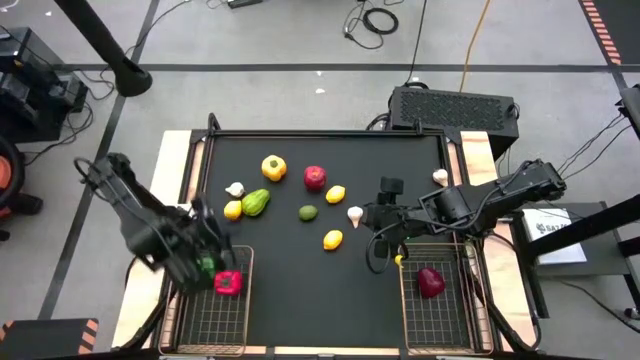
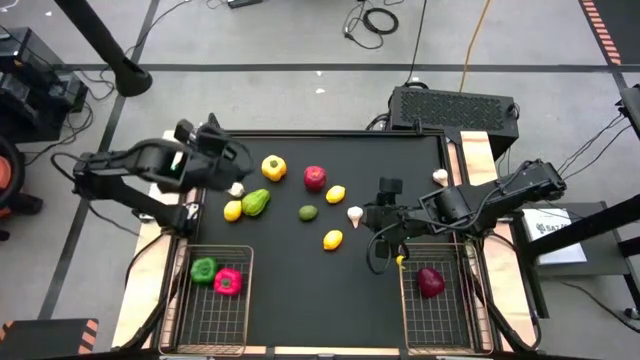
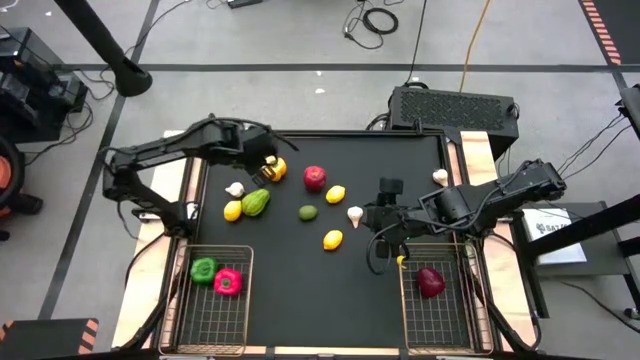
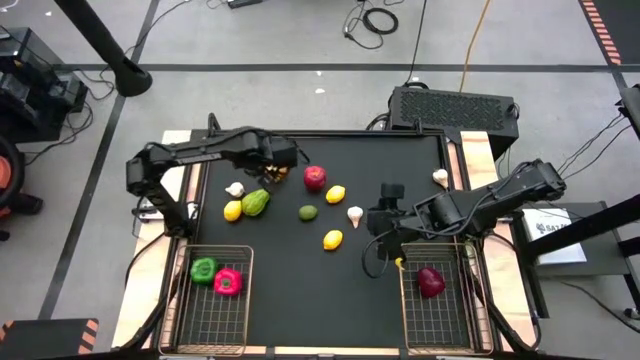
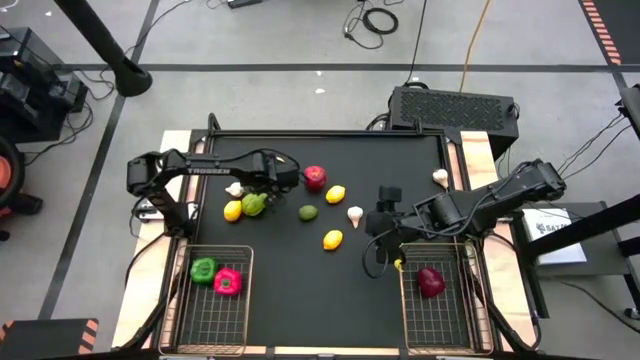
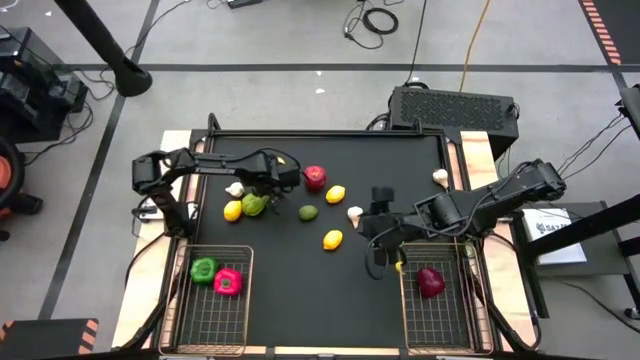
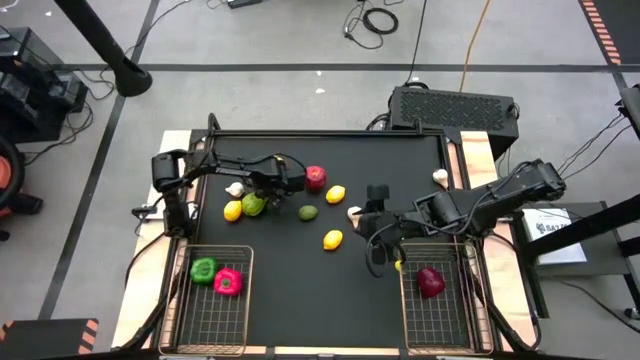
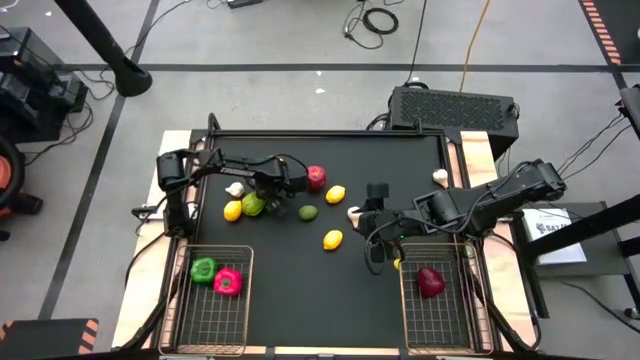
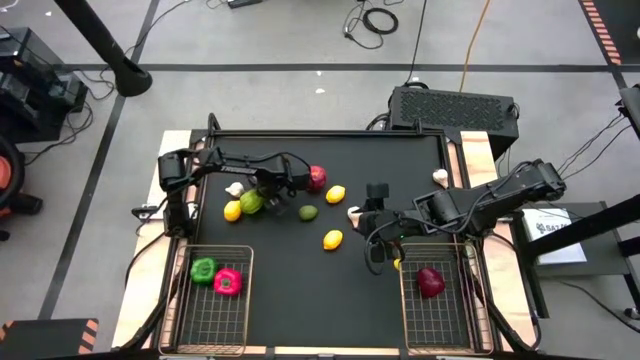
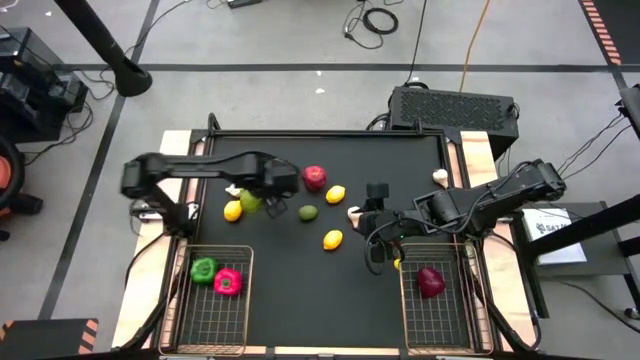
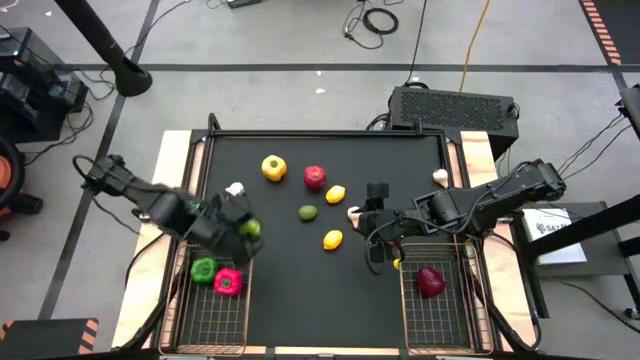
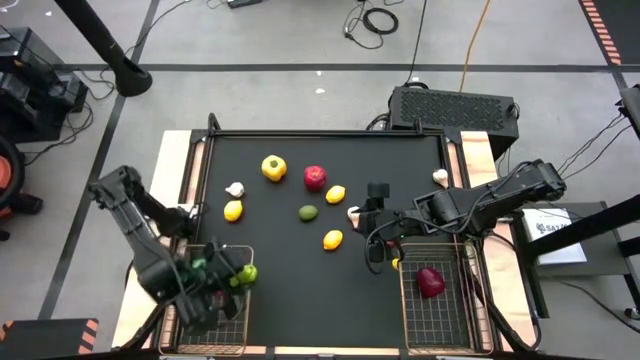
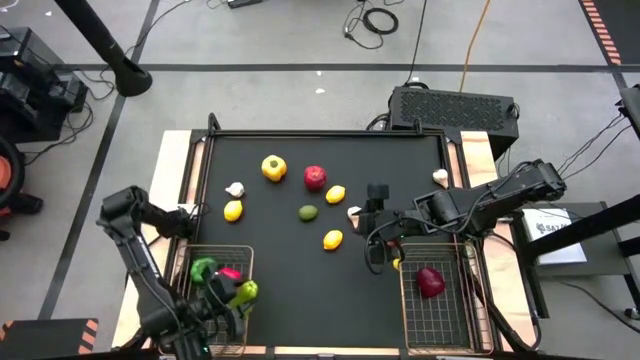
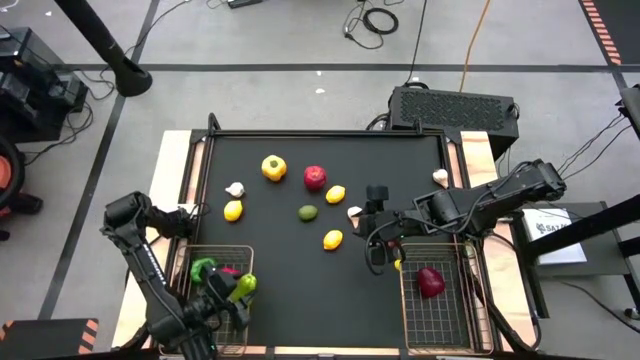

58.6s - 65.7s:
Task: Sort produce into baskets
Put the chayote into the left gold wire basket

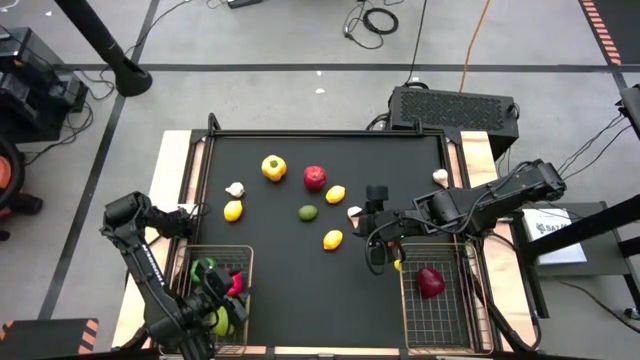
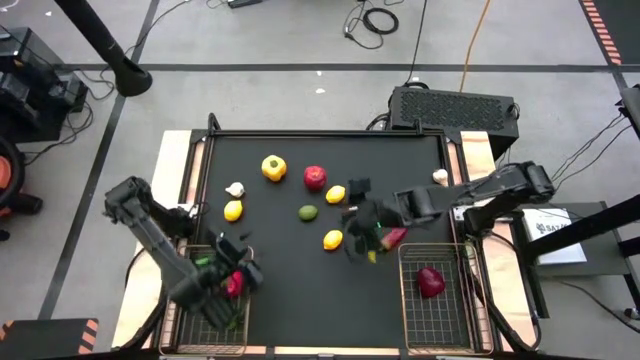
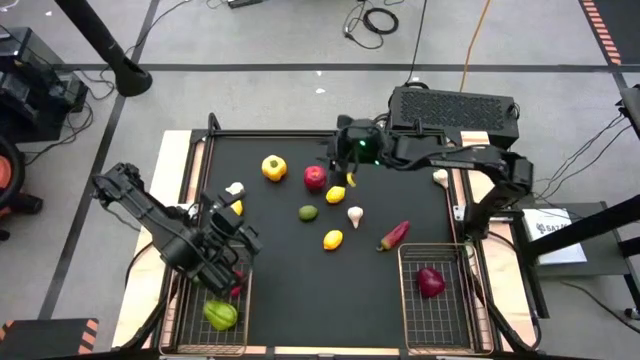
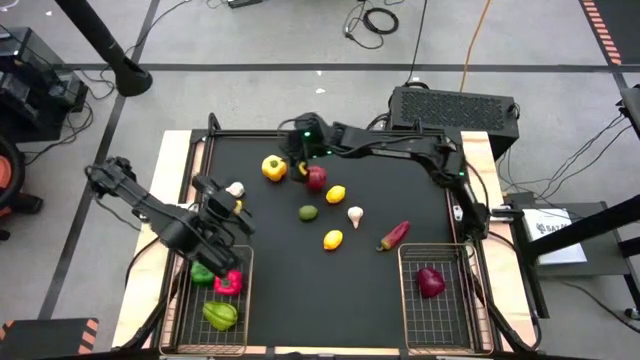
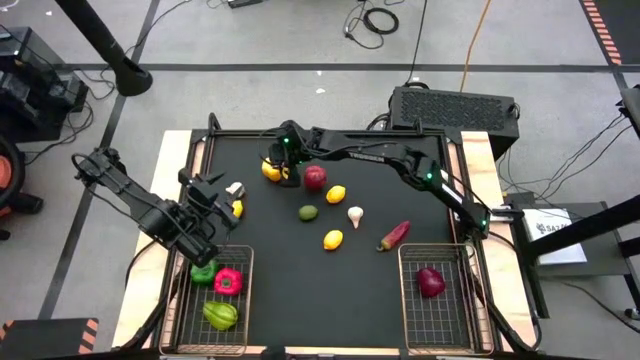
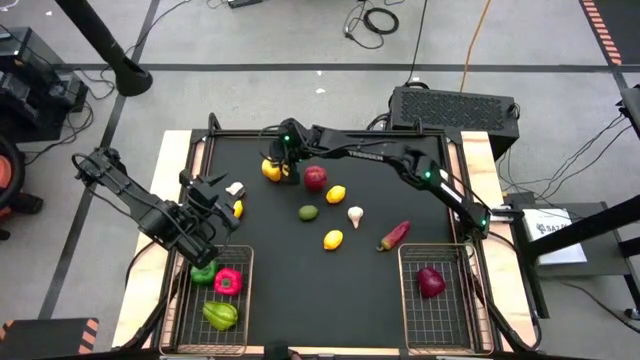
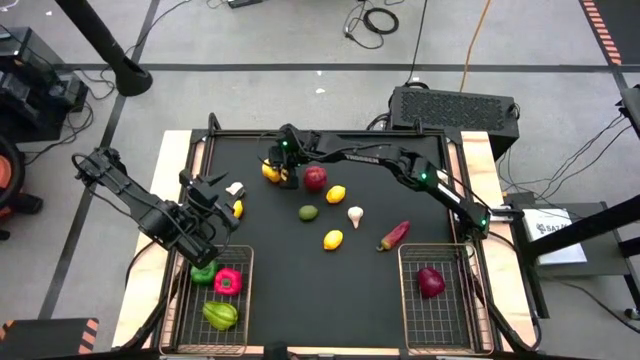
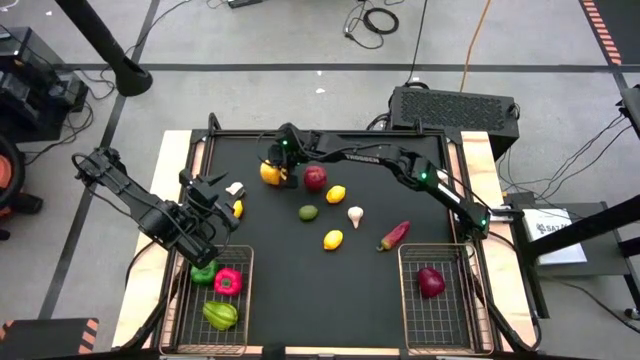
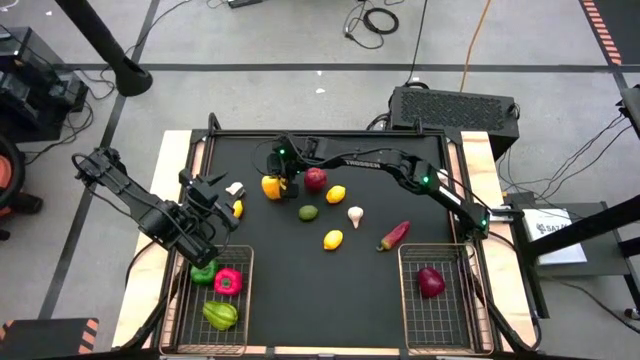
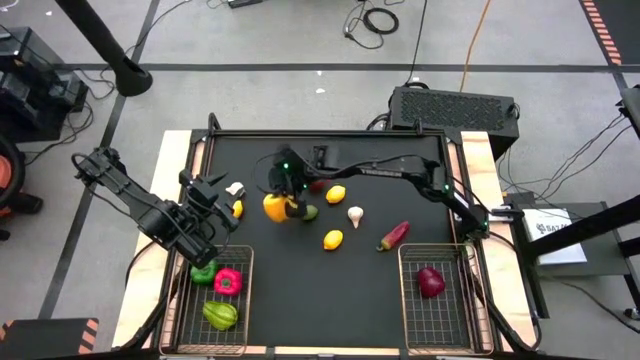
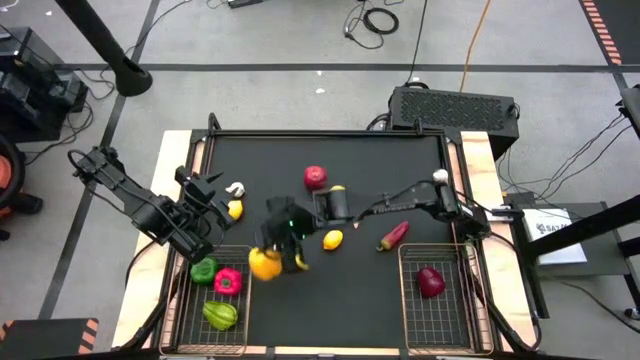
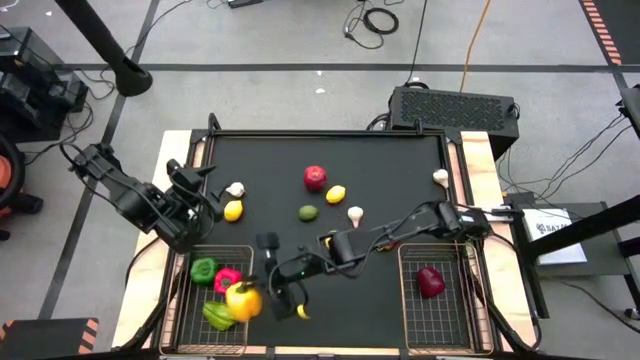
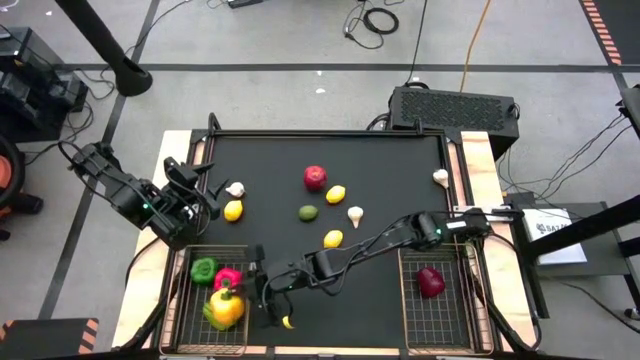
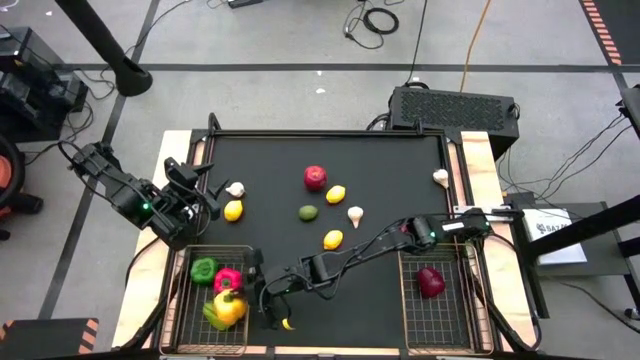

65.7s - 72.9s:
Put the yellow bell pepper into the left gold wire basket

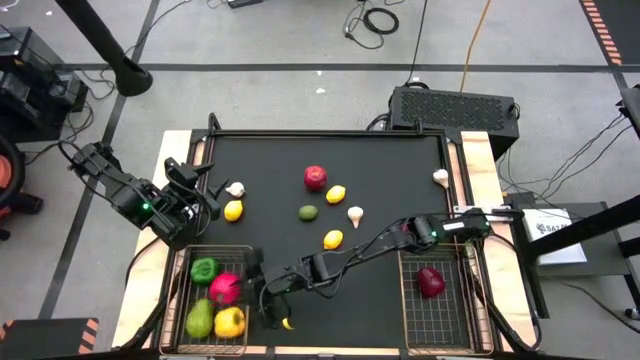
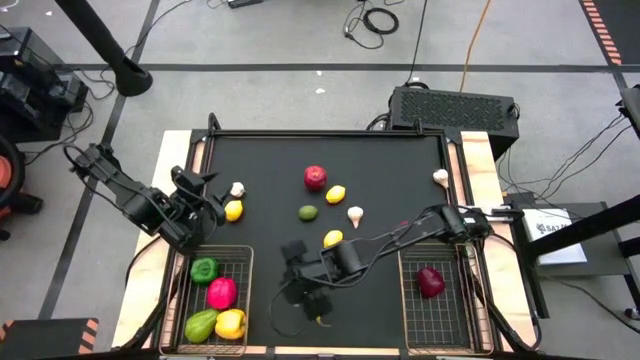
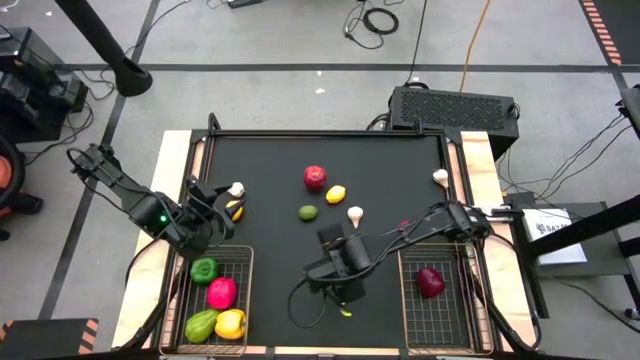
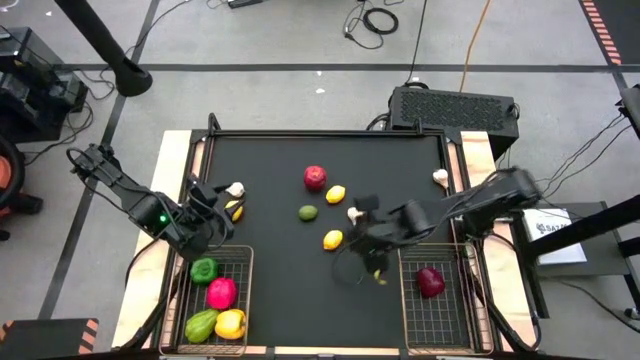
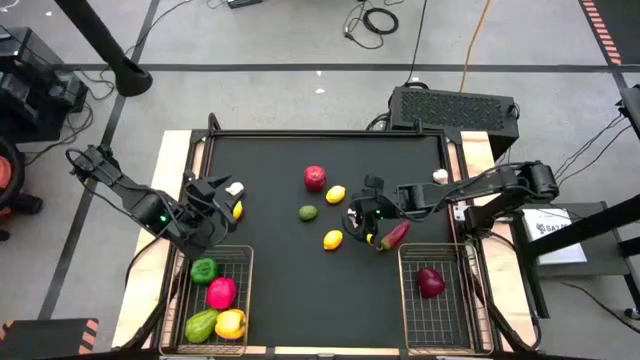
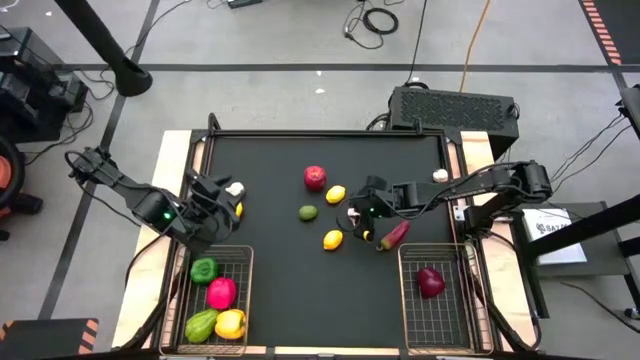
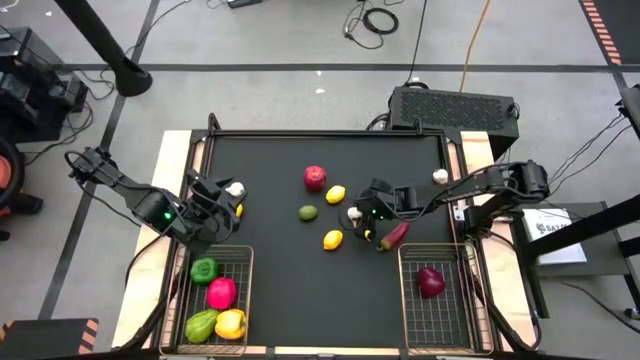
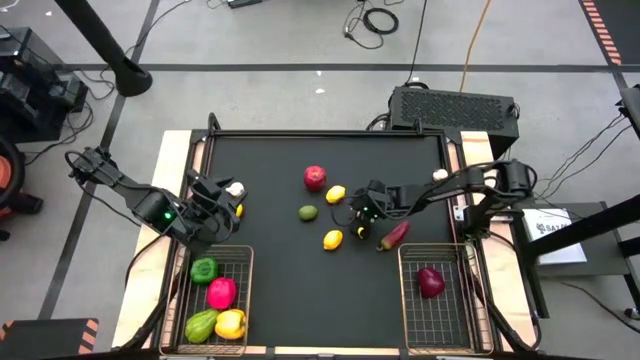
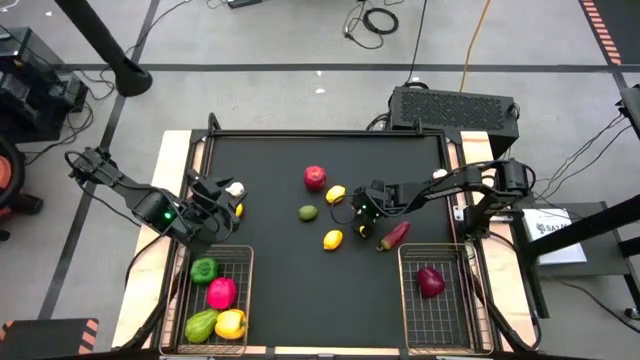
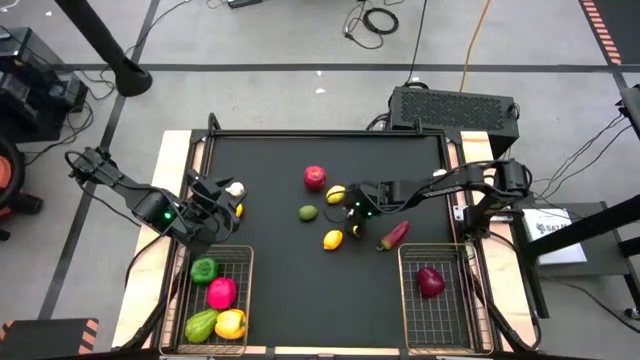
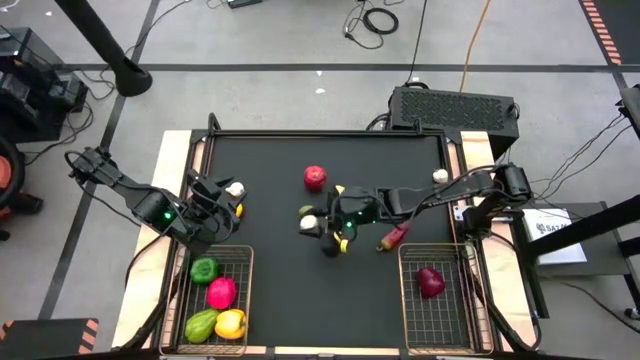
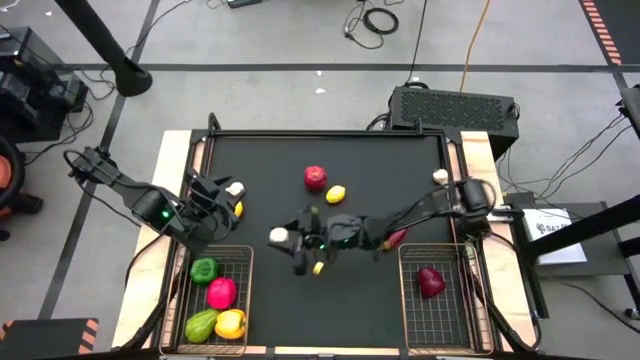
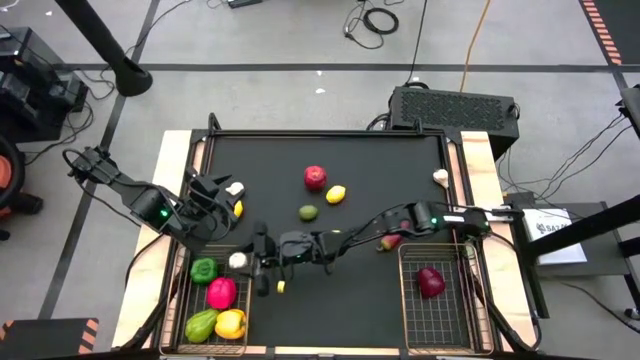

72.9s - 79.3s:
Put the middle garlic into the left gold wire basket

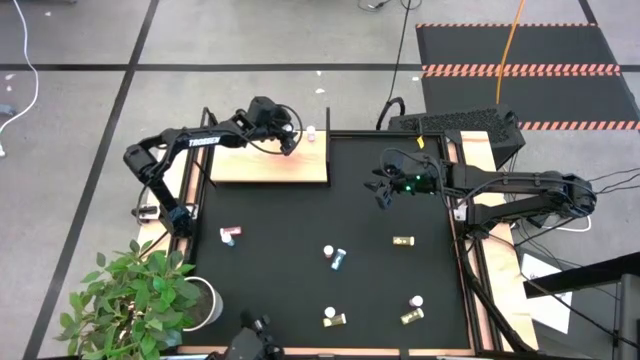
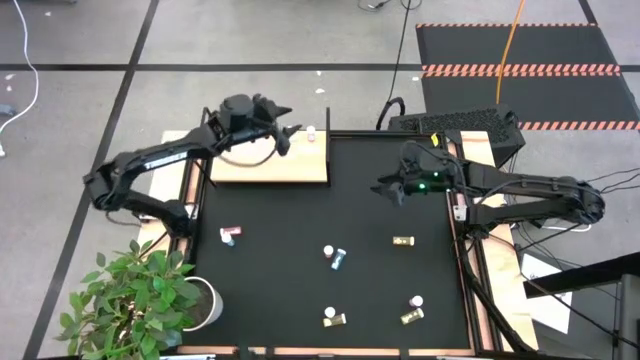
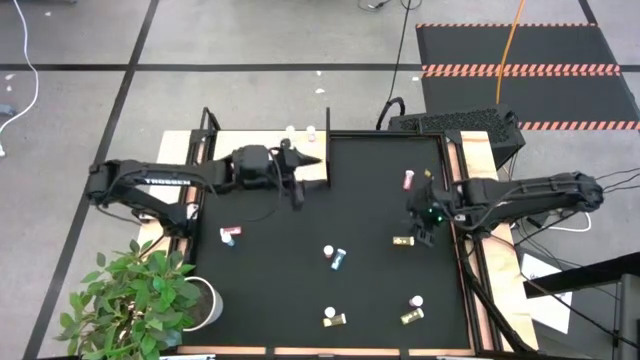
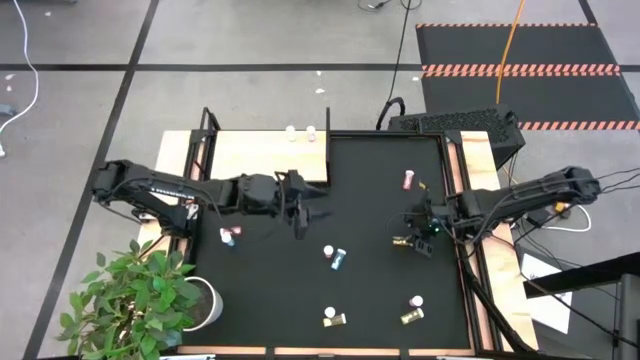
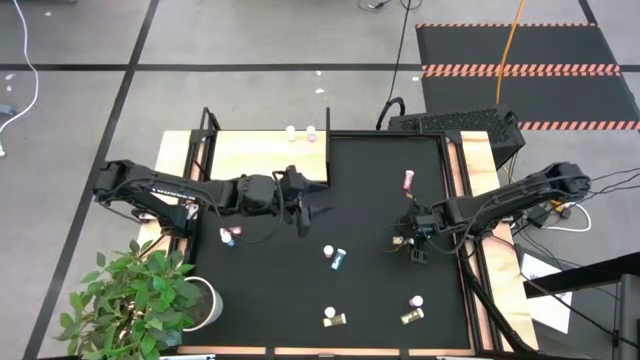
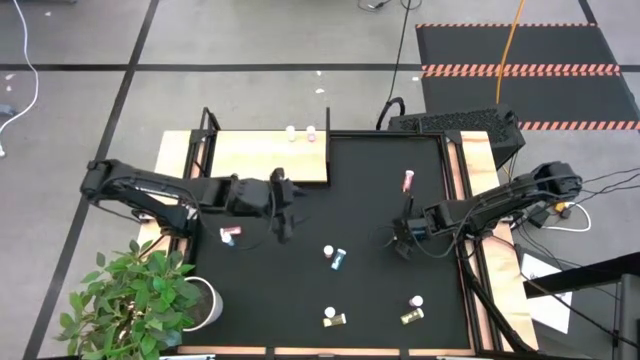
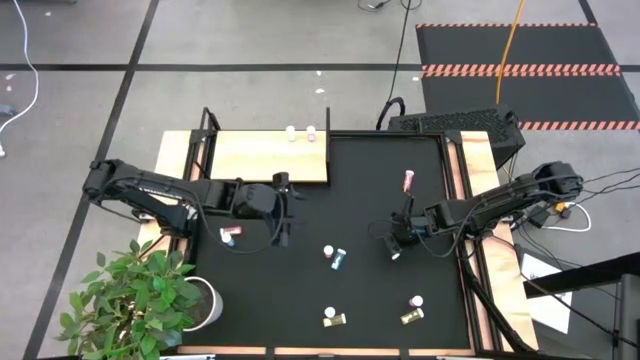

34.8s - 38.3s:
Task: Pick and place medicine bottles onto shelf by color
Put the top right yellow pill bottle on the shelf
